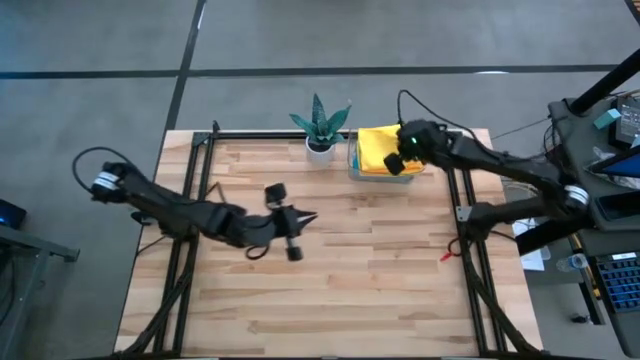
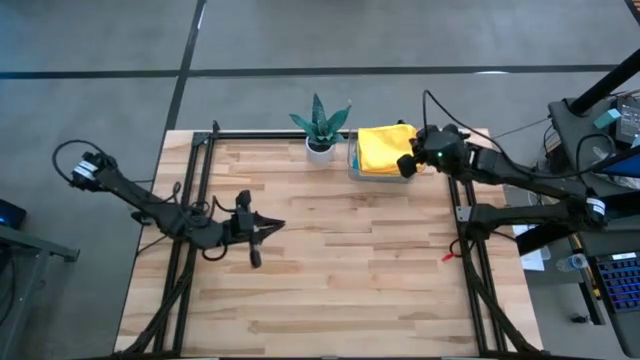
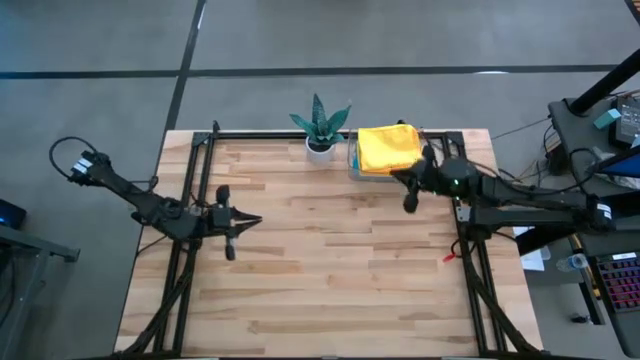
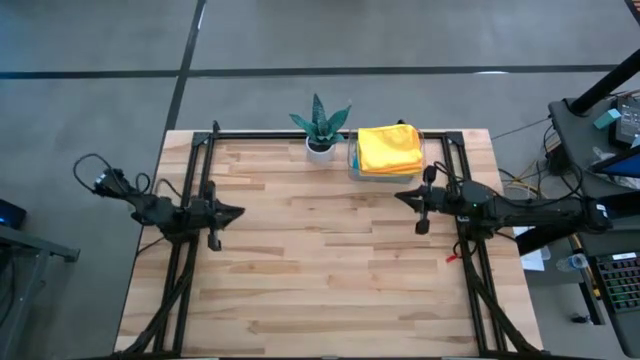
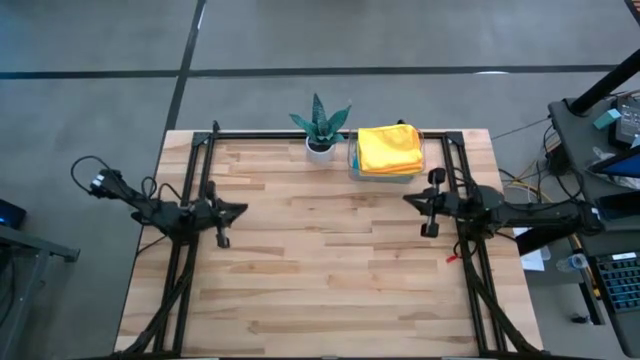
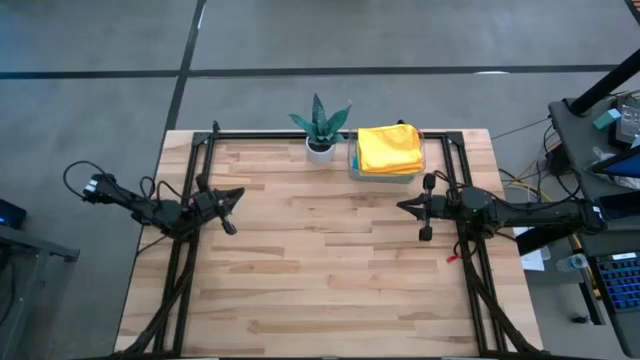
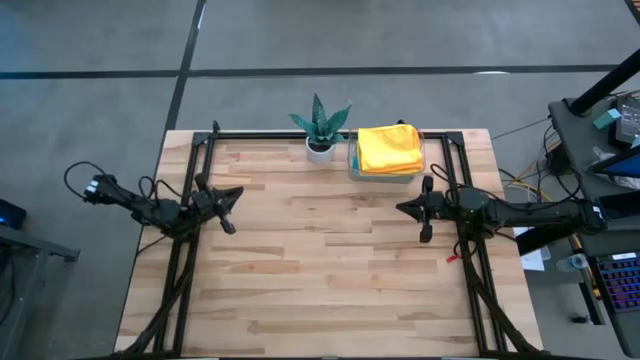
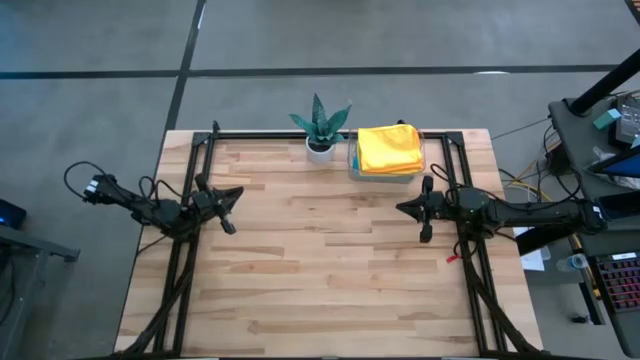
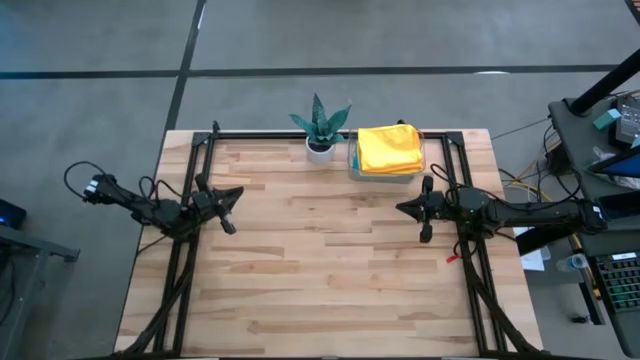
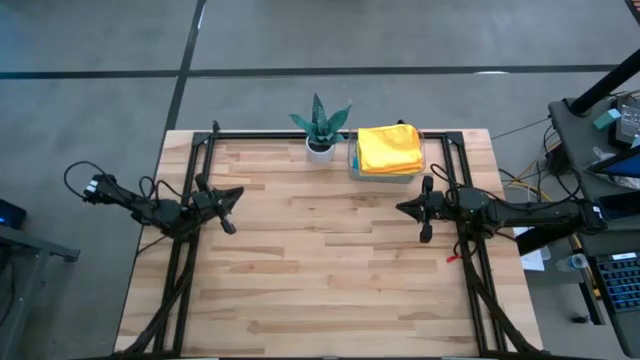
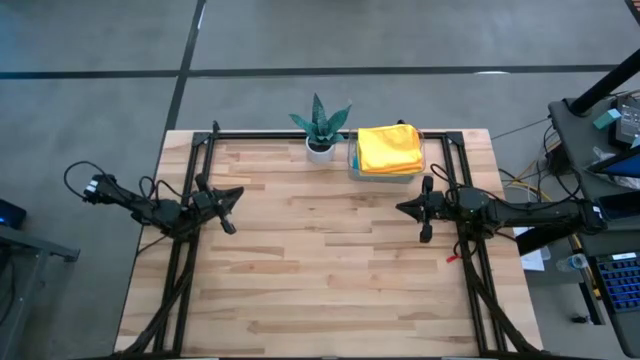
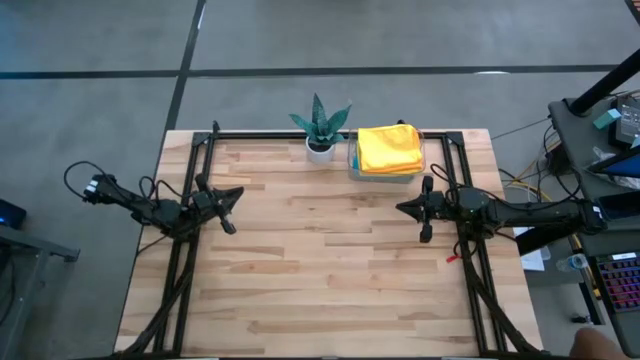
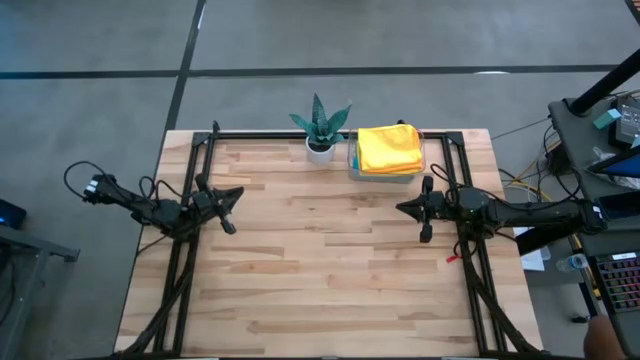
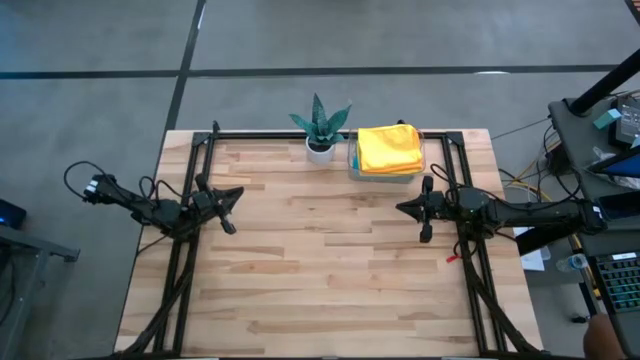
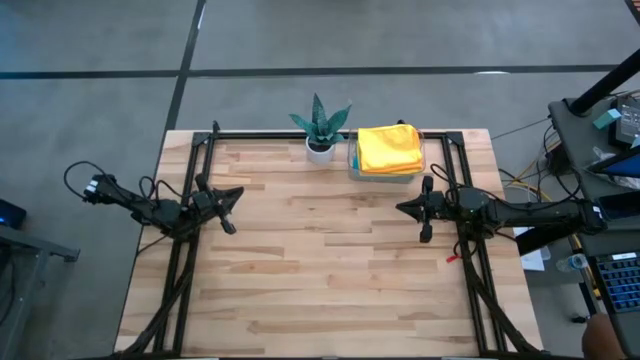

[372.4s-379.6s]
Task: Fold microfiber towels
Return to Home Position

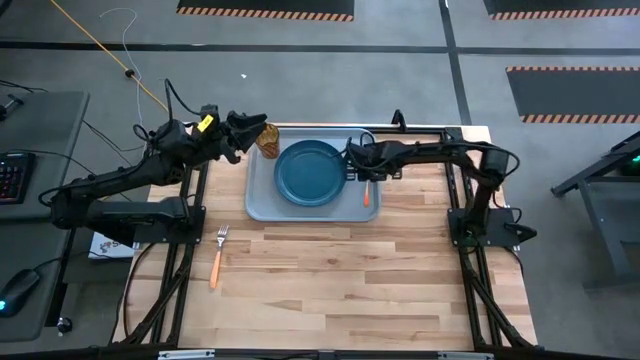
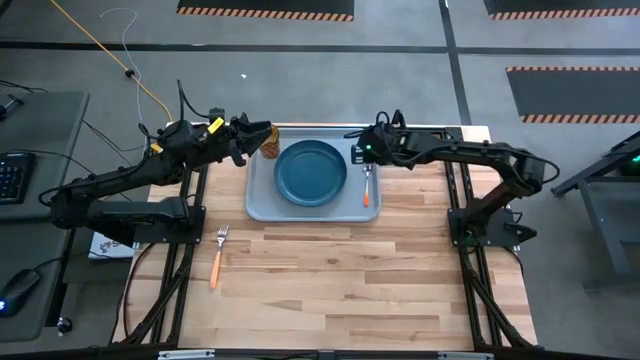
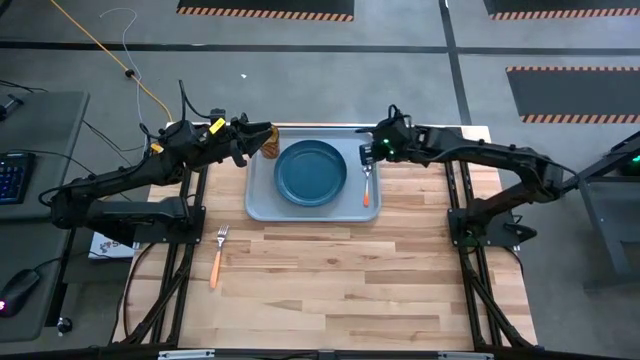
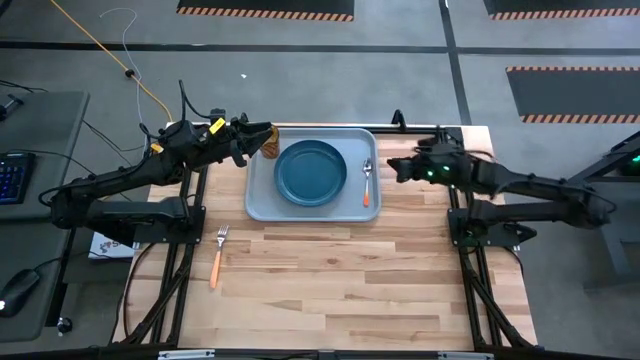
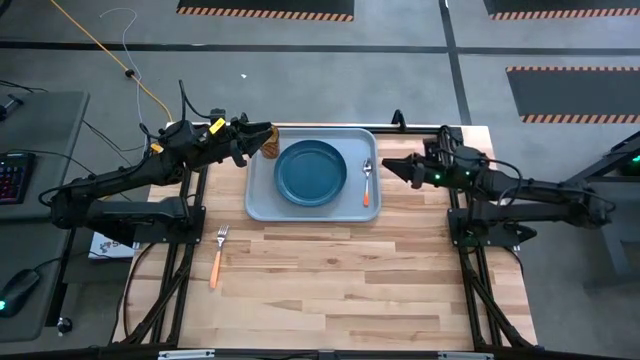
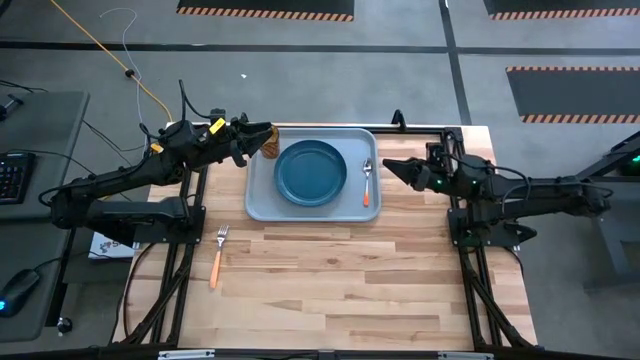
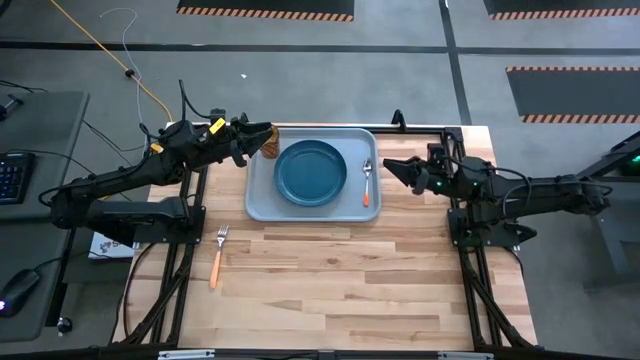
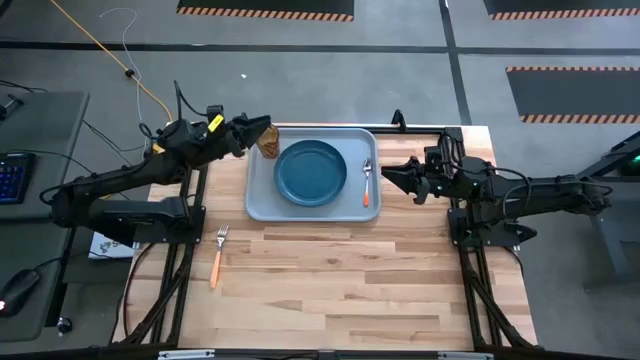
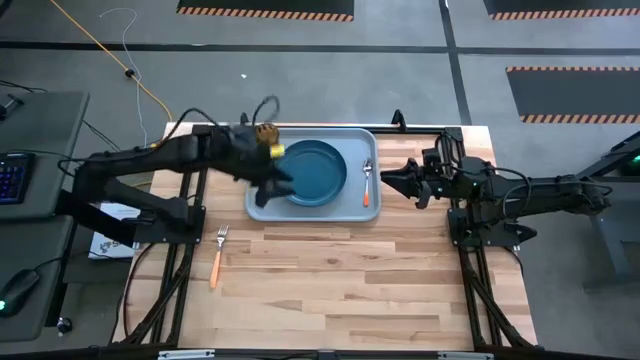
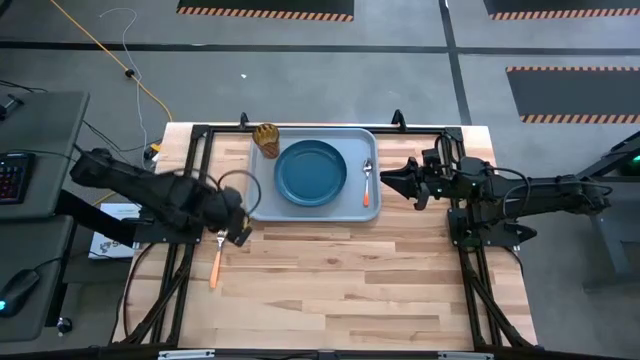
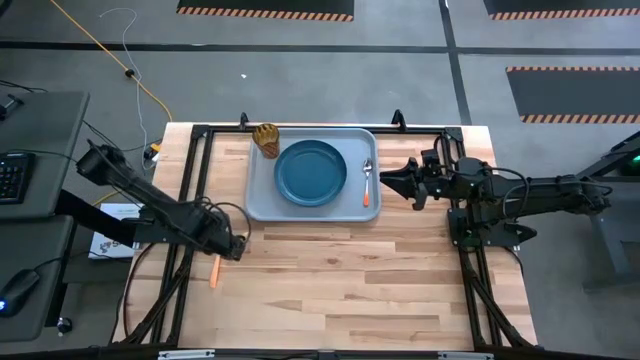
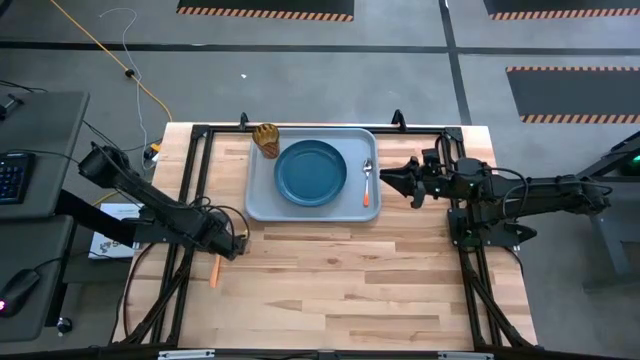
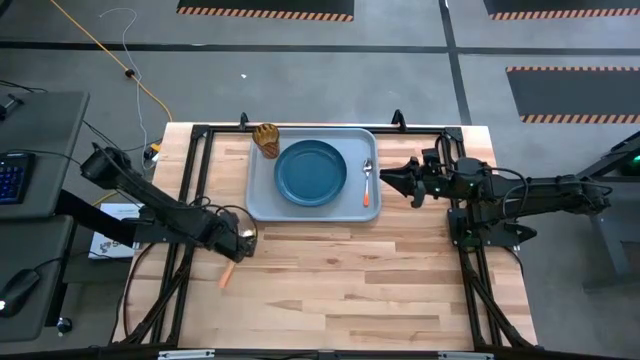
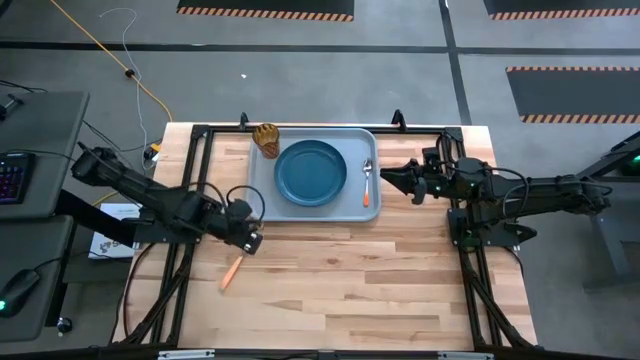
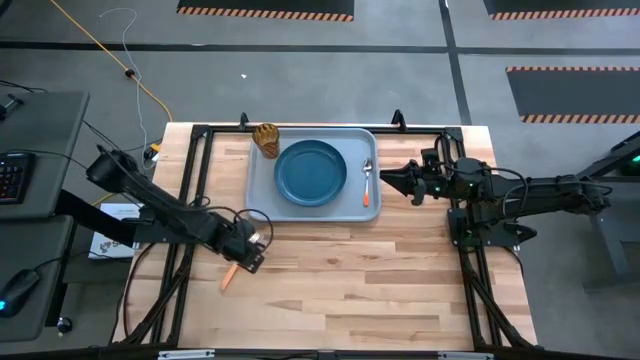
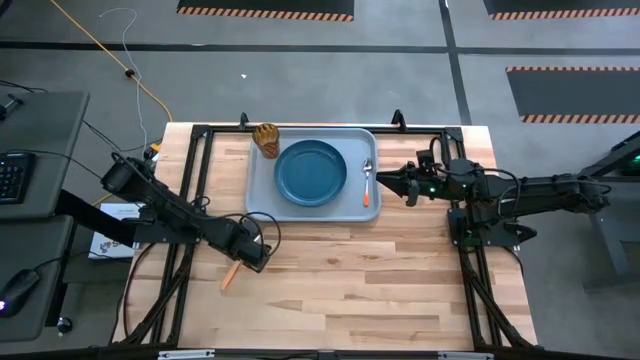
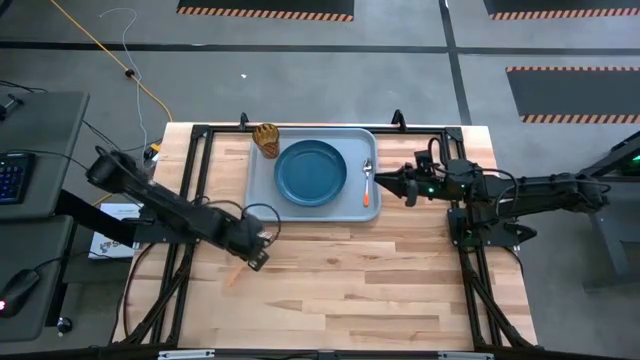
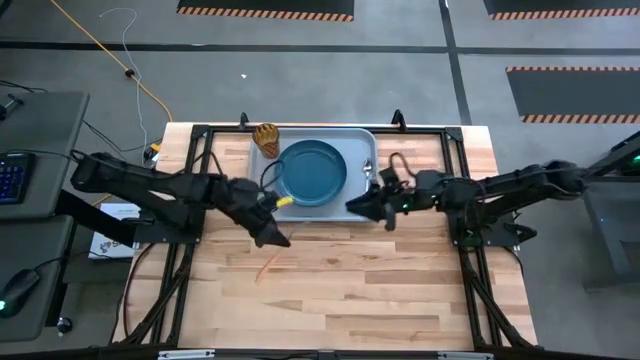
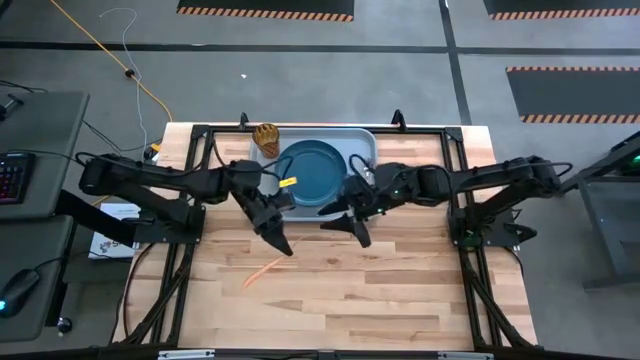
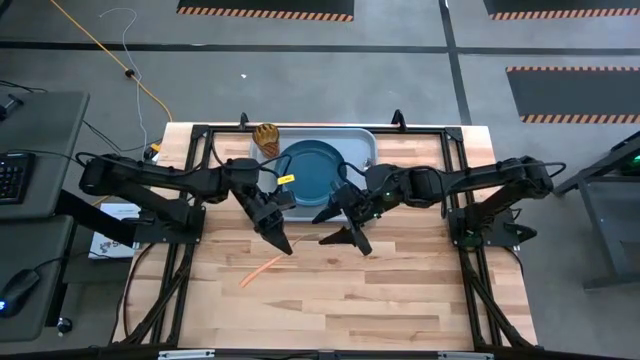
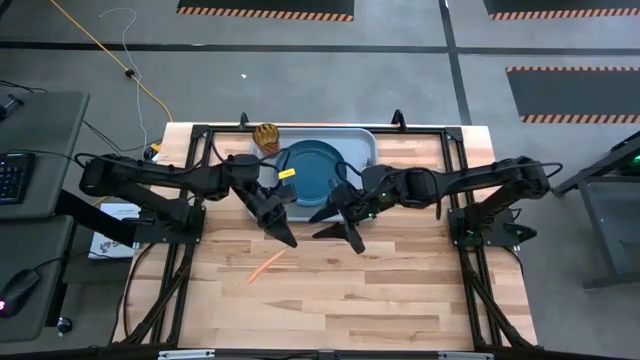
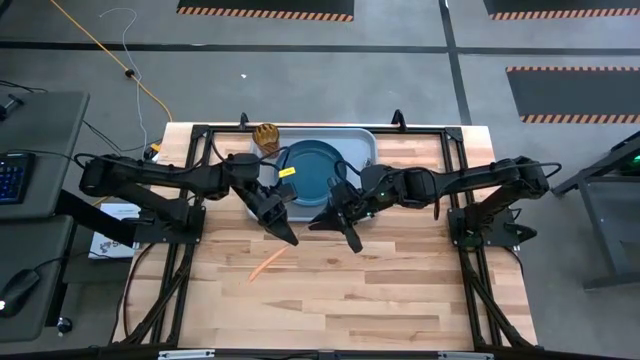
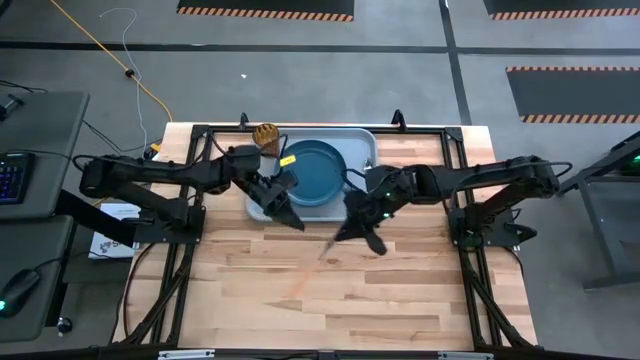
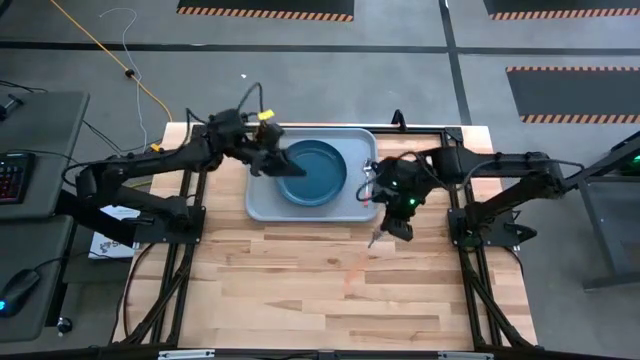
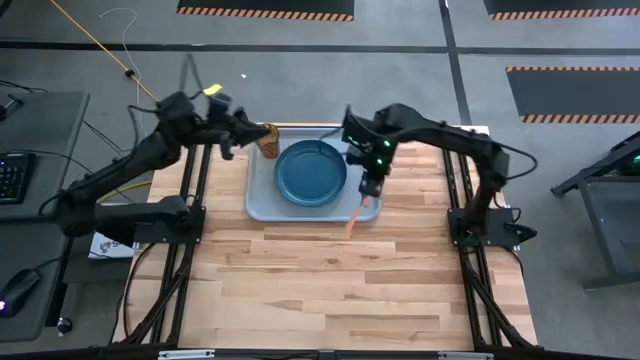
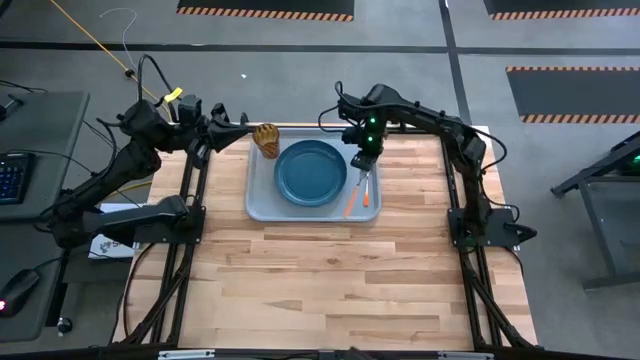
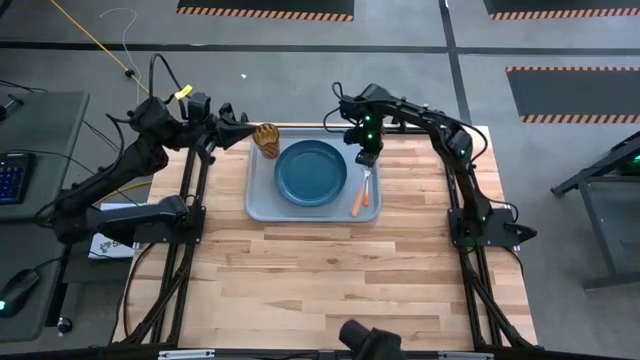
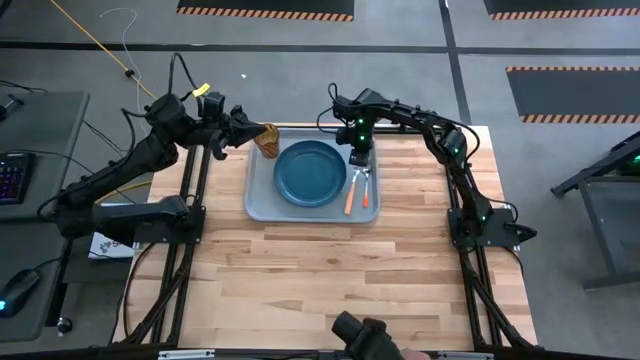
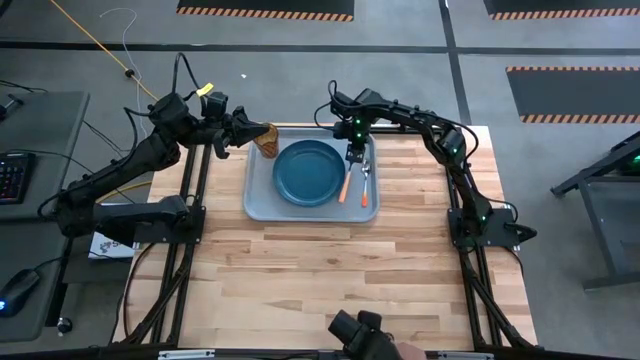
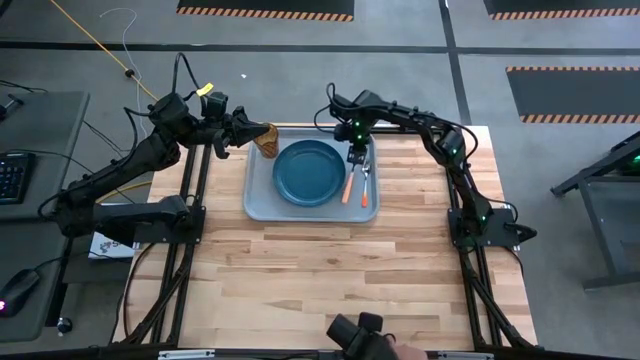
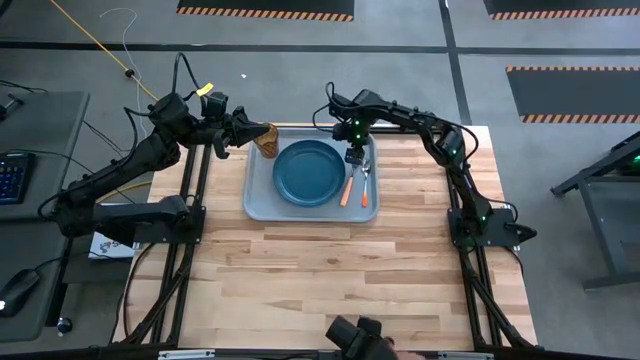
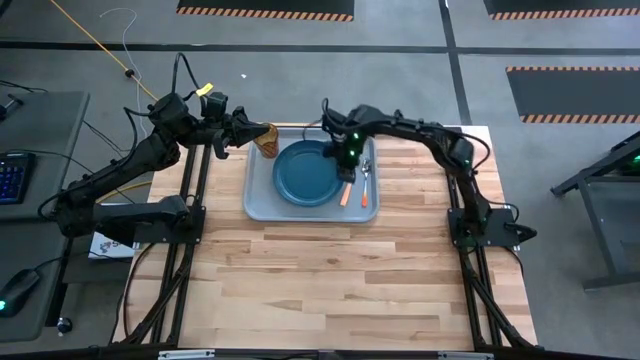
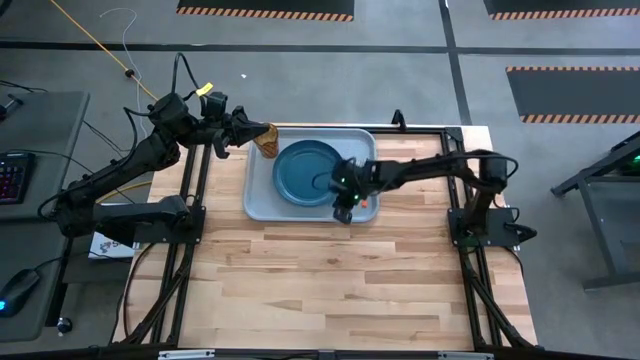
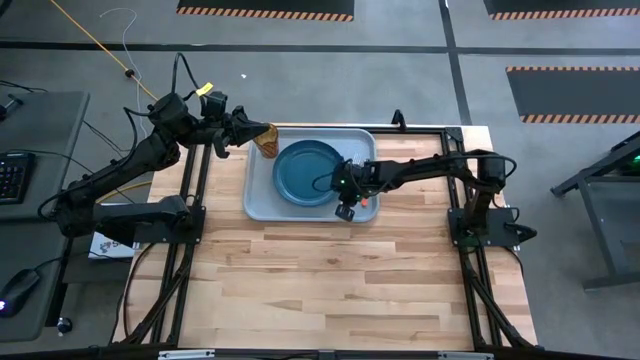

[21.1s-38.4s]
Task: Pick and place plate/cup/fork/spoon on tray
Put the fork between the plate and spoon on the tray
